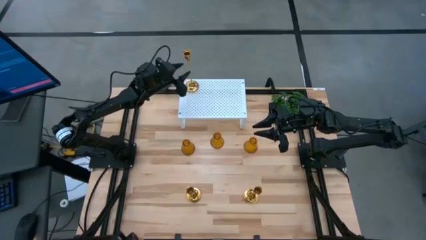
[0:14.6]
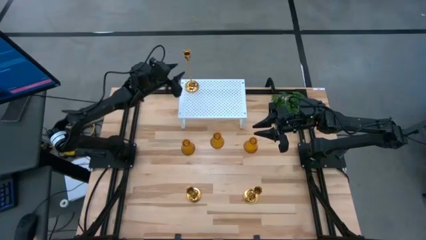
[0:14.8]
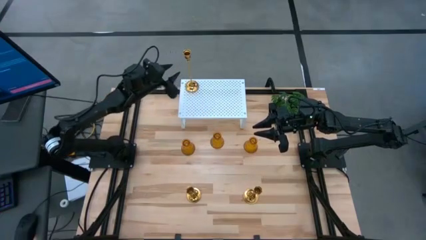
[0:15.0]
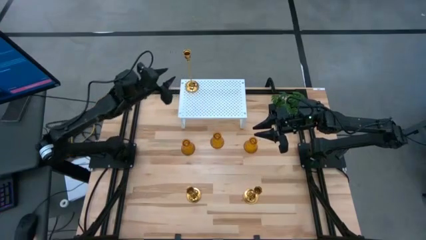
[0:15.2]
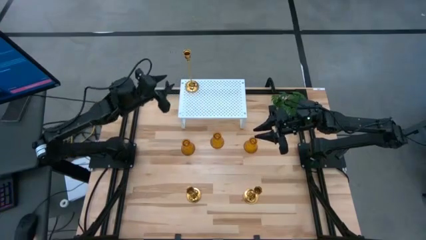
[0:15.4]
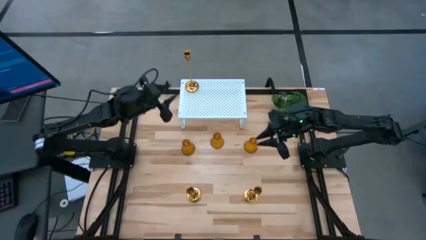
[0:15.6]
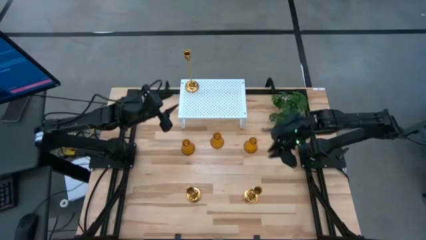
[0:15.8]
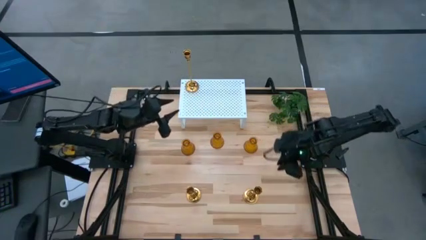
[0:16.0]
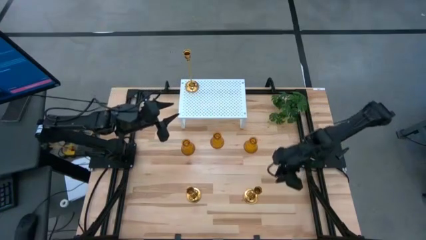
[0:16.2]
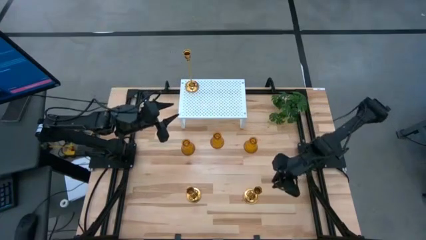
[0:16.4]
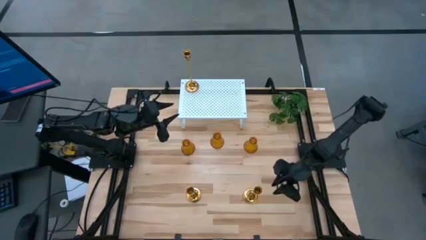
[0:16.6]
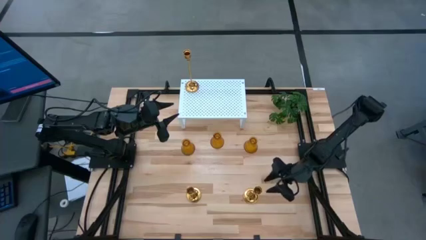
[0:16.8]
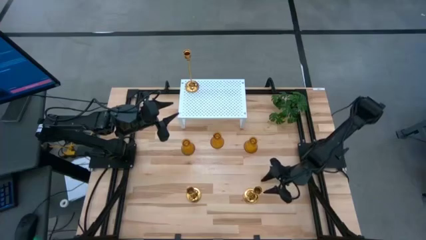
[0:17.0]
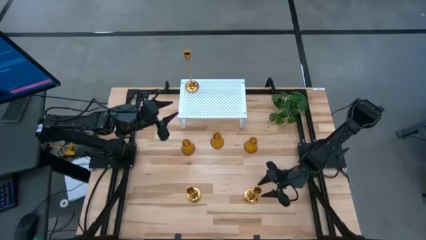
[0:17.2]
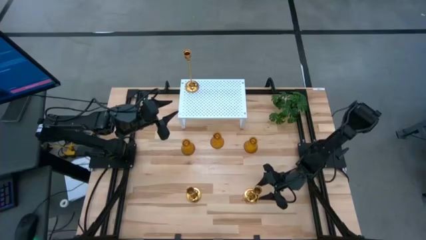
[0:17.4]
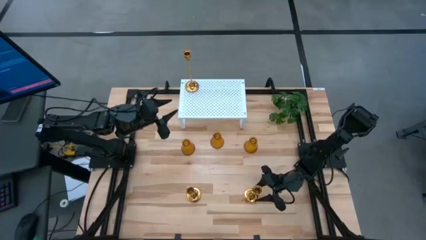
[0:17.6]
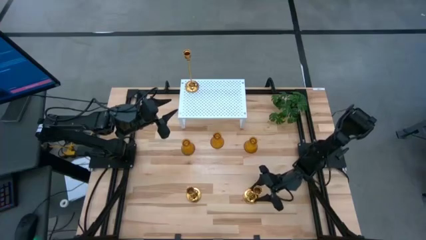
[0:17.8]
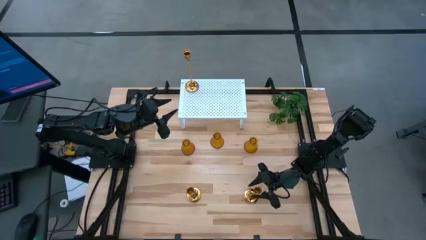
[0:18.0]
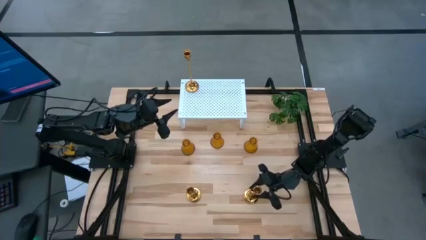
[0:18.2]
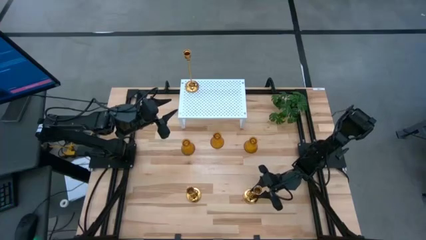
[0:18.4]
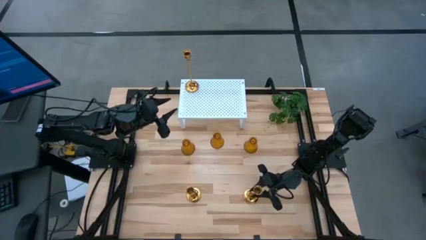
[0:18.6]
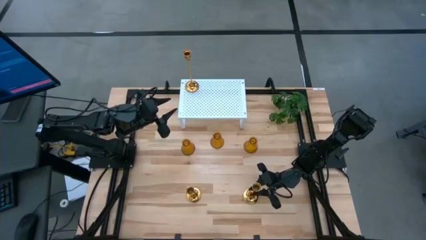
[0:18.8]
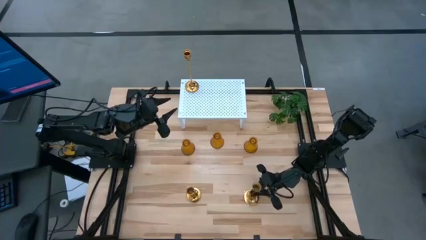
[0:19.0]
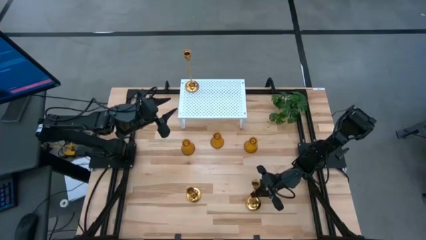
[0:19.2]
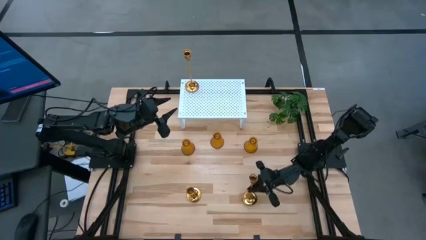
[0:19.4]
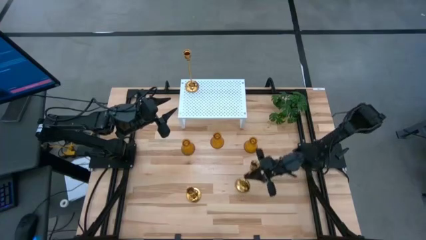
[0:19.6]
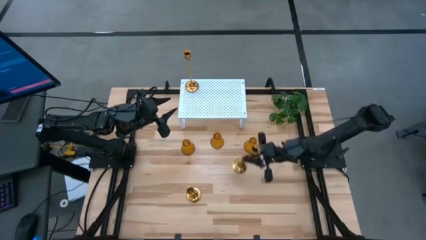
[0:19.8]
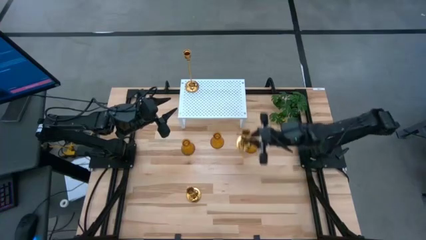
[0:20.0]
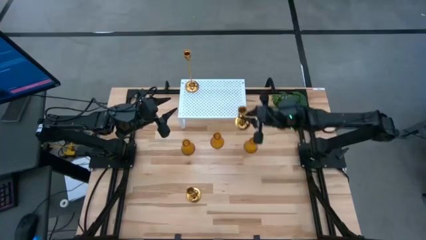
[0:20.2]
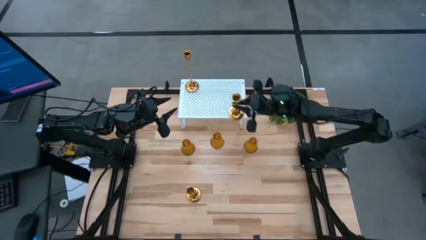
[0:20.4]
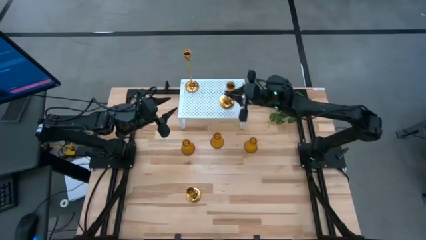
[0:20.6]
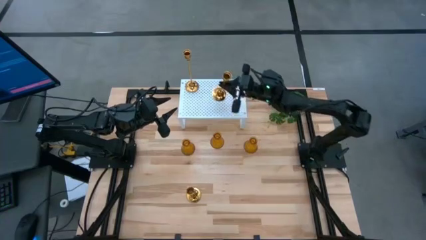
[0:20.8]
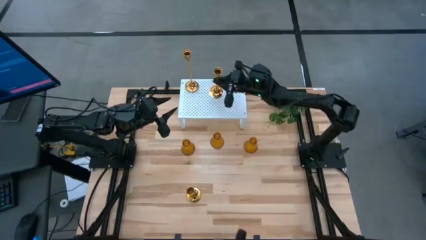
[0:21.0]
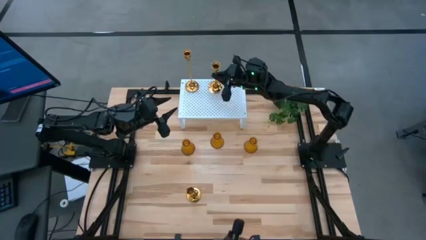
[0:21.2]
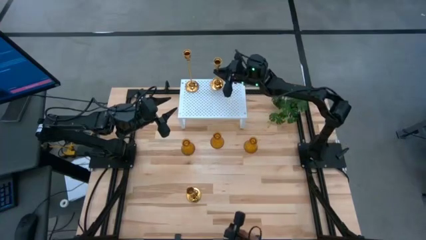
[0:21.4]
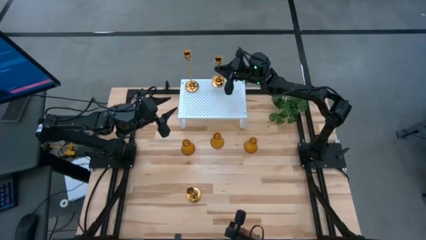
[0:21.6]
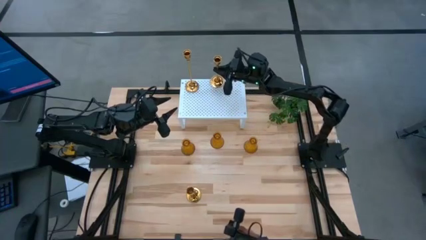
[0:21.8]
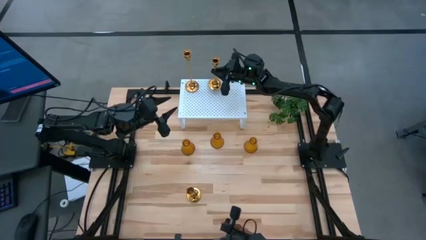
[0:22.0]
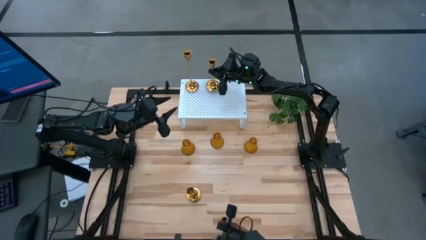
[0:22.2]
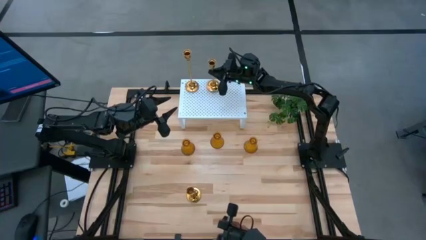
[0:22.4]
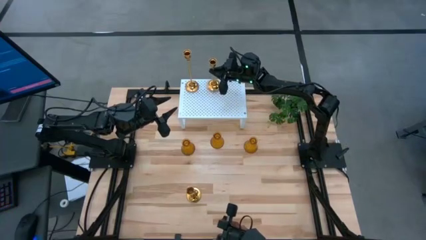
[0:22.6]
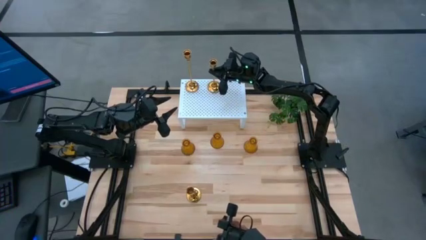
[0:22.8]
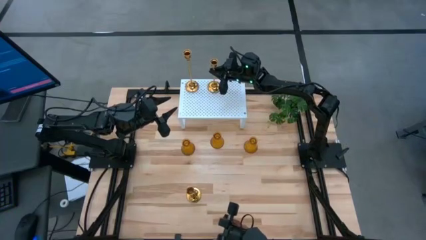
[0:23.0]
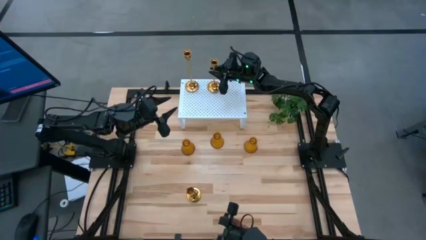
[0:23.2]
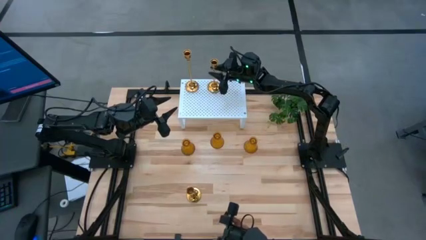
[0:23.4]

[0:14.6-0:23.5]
Task: Pick & Place candle stick holders
Put the right gold candle holder on the shelf aligned with the other gold candle holder

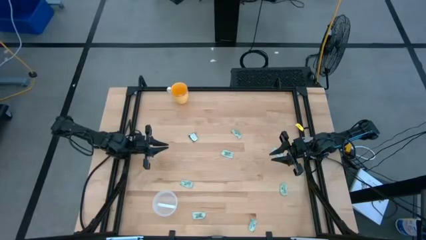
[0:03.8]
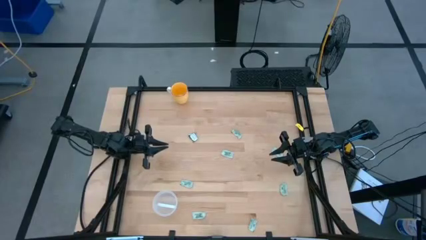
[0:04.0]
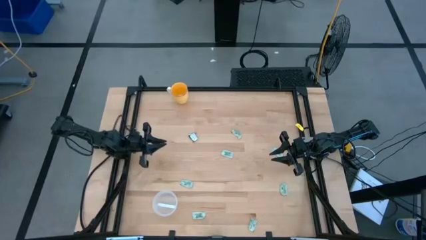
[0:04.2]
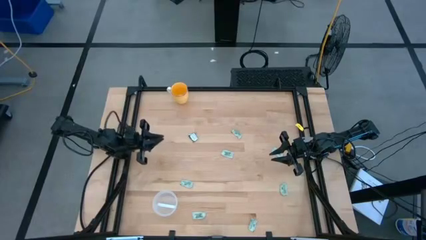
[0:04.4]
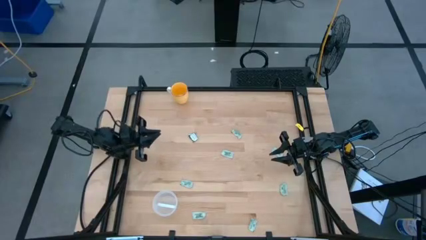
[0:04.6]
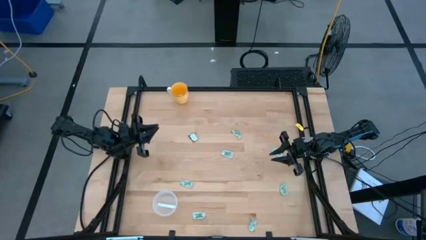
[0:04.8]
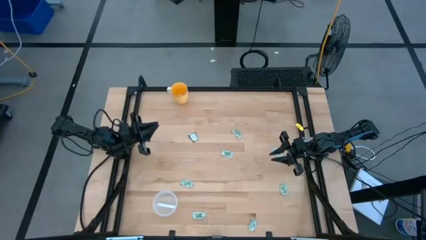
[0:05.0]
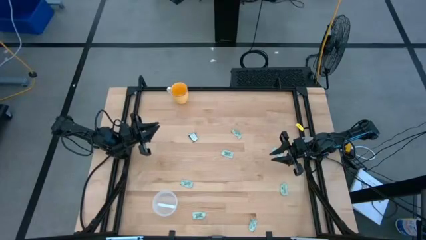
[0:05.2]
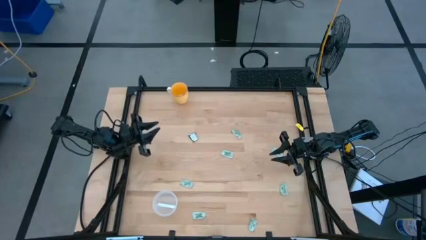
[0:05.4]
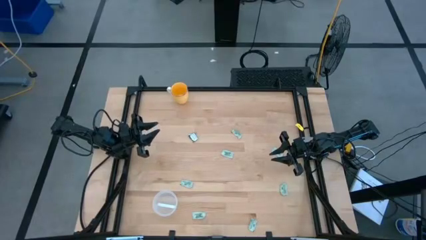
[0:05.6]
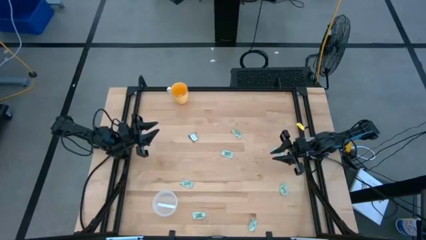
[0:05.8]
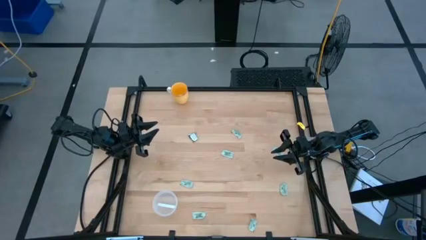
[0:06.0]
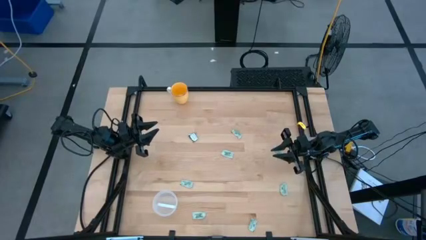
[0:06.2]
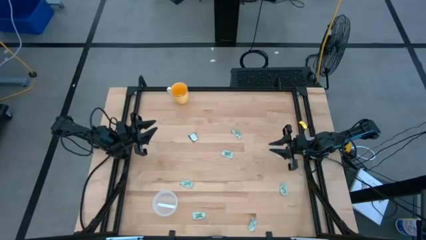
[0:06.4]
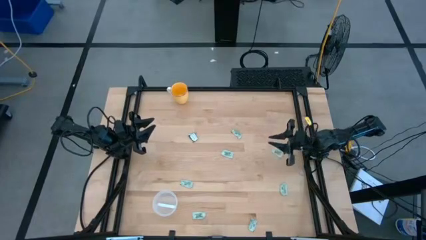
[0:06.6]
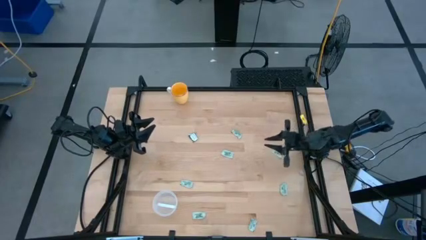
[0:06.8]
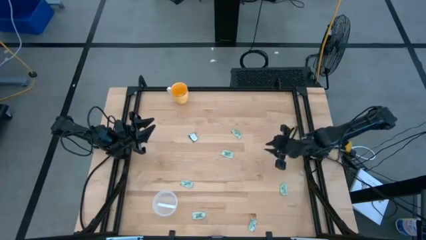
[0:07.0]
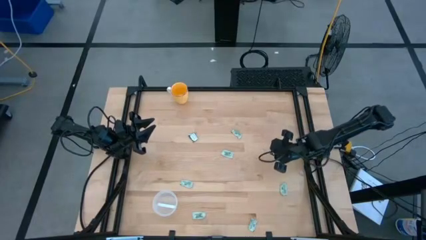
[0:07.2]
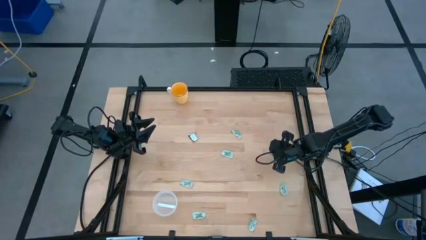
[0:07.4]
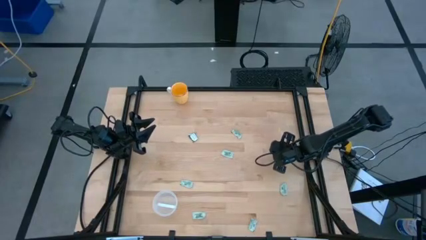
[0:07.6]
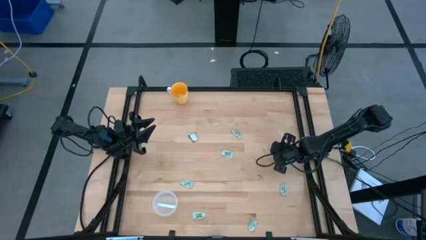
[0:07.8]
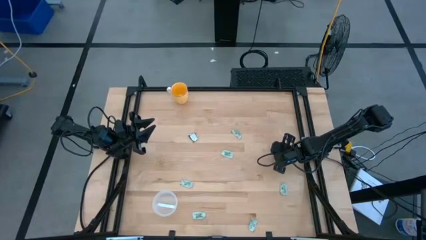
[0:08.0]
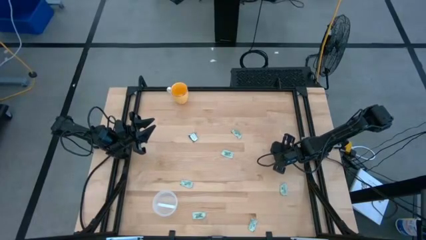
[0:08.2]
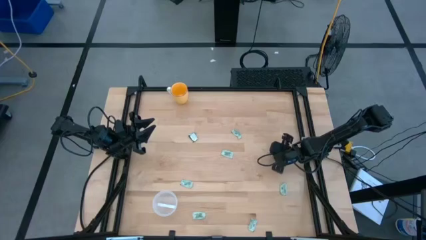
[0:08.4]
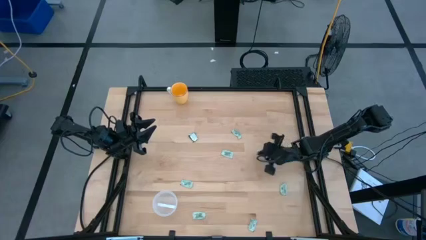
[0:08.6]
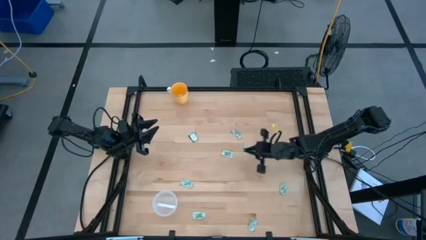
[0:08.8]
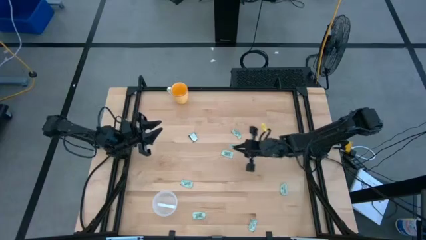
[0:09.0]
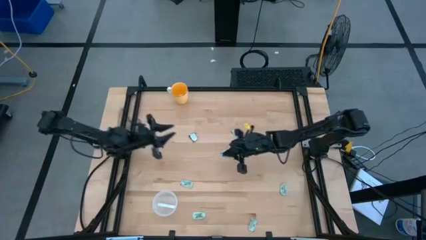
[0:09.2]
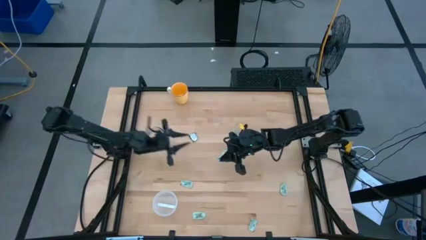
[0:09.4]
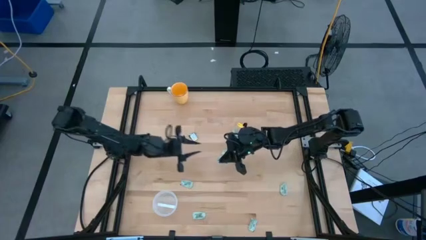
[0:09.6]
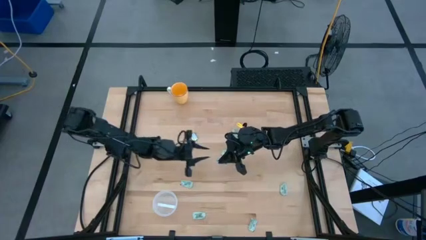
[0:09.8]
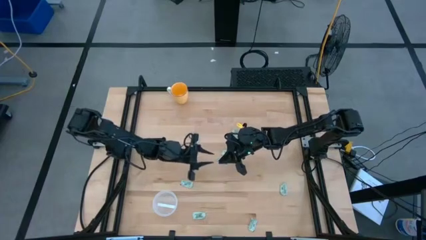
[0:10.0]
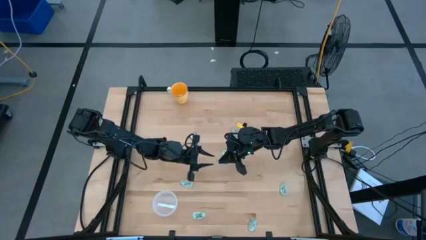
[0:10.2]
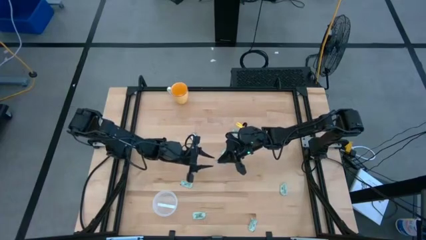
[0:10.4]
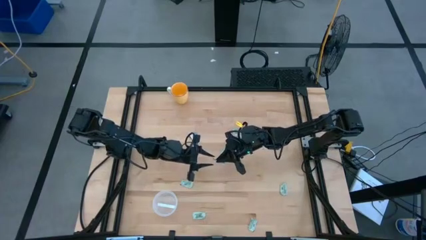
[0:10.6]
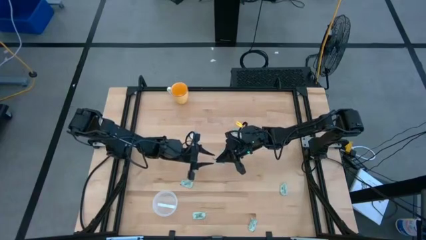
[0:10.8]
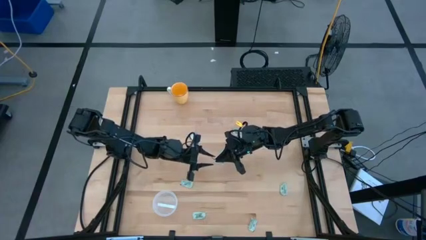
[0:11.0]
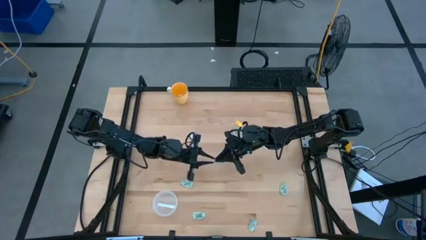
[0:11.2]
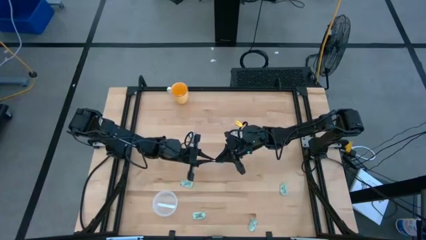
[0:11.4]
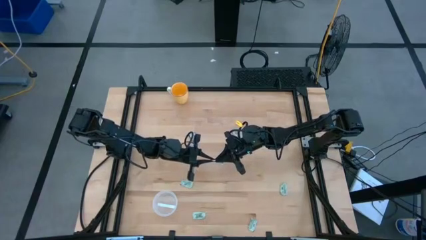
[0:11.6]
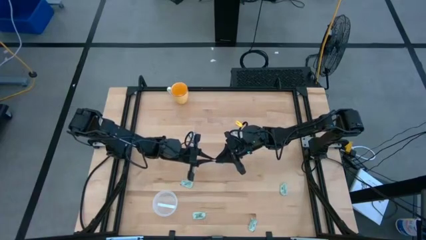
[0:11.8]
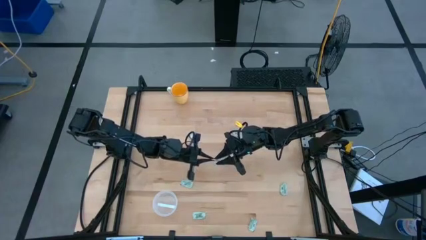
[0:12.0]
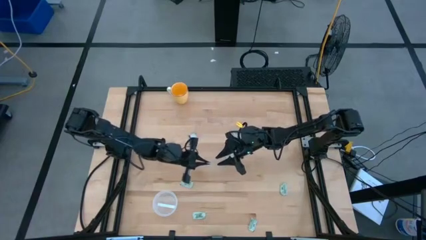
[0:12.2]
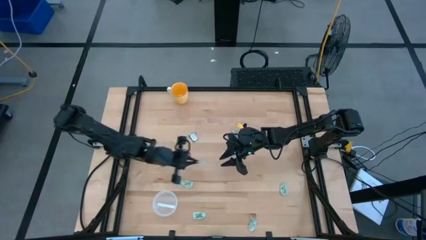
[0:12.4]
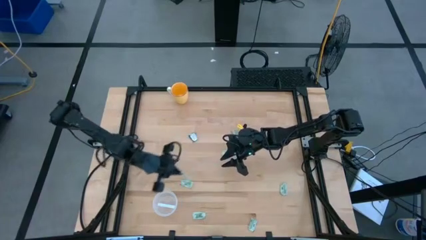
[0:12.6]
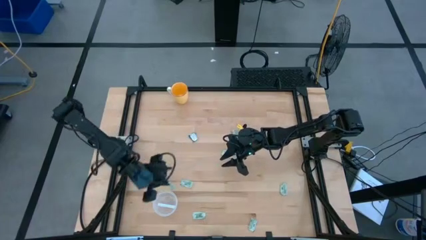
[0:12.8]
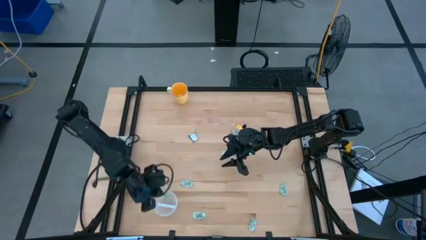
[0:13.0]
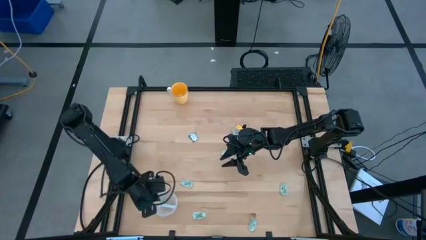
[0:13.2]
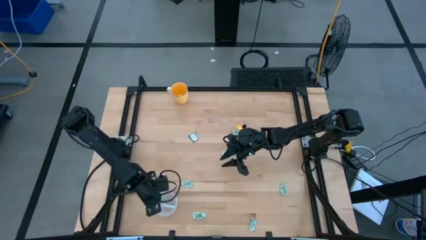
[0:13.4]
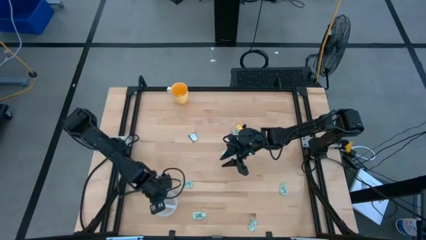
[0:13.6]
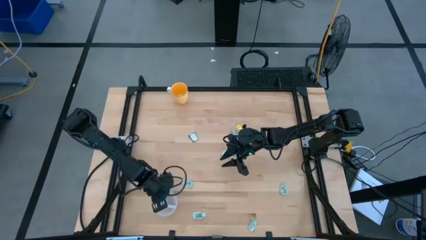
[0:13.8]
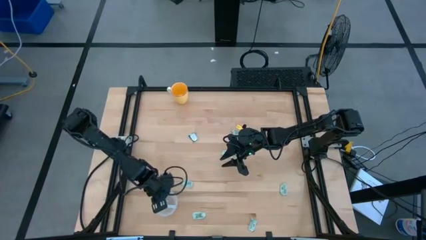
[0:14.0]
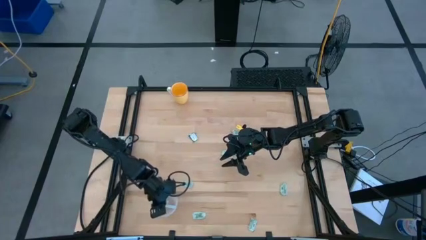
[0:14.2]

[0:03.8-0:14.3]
Task: Pick and place Stevia / Truvia into bins
Put the stevia packet into the transparent container
